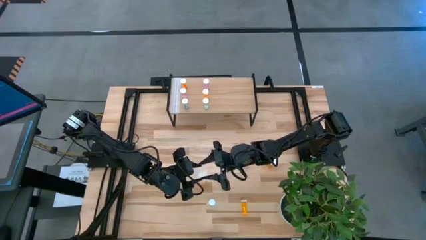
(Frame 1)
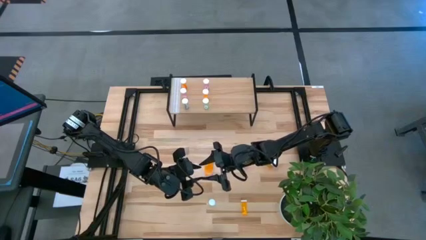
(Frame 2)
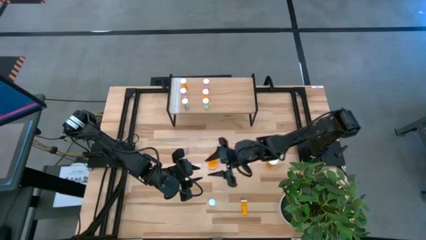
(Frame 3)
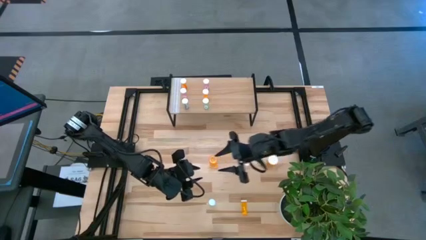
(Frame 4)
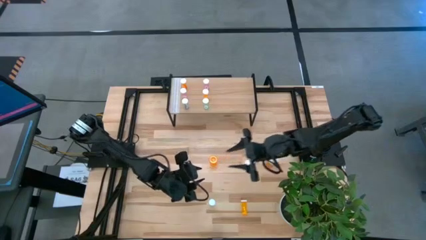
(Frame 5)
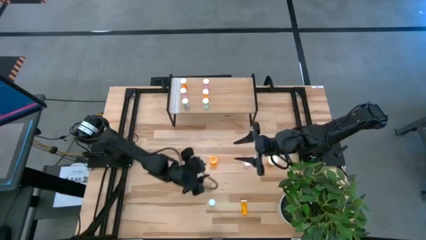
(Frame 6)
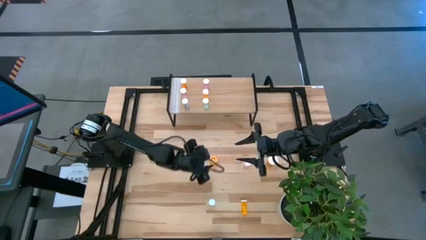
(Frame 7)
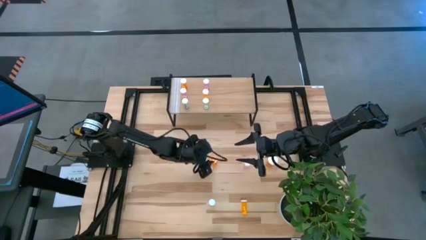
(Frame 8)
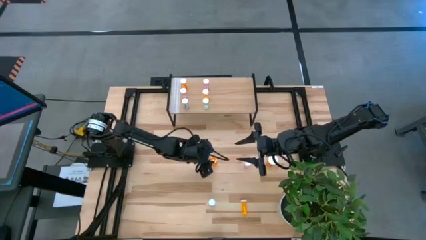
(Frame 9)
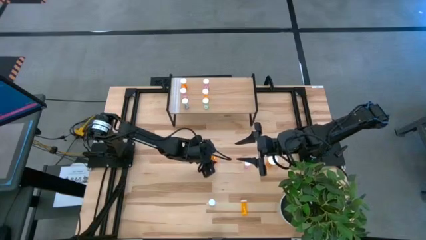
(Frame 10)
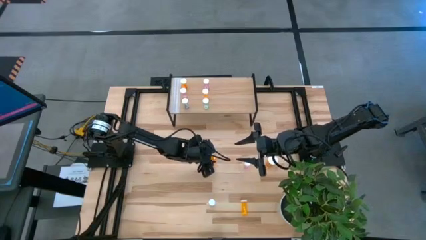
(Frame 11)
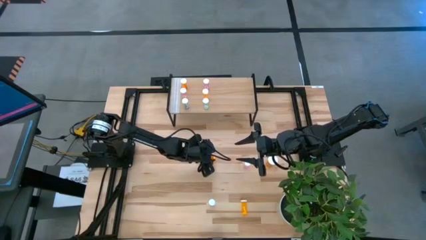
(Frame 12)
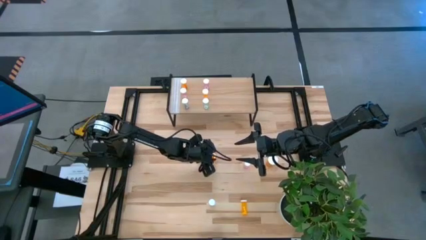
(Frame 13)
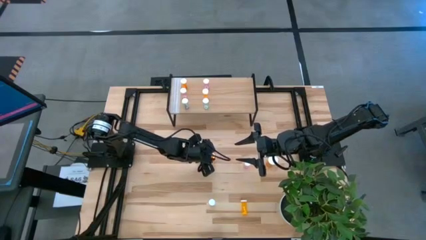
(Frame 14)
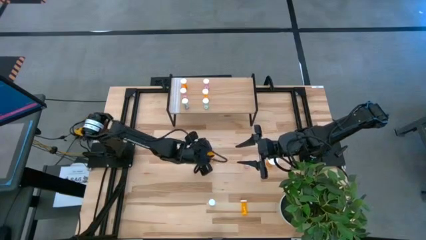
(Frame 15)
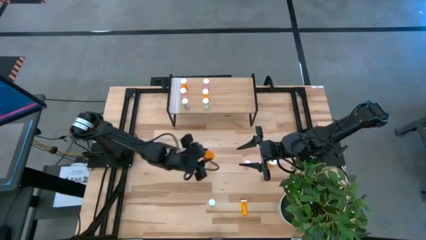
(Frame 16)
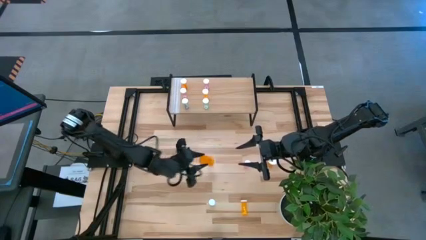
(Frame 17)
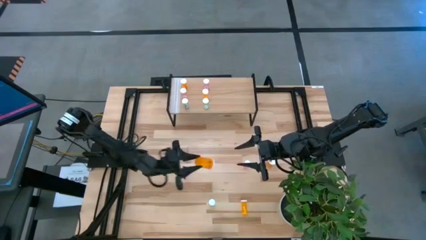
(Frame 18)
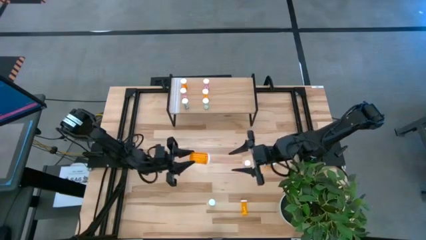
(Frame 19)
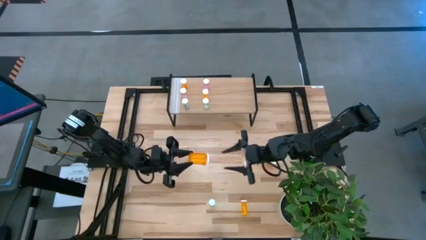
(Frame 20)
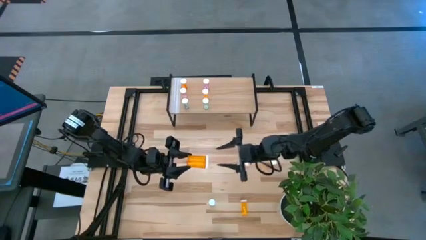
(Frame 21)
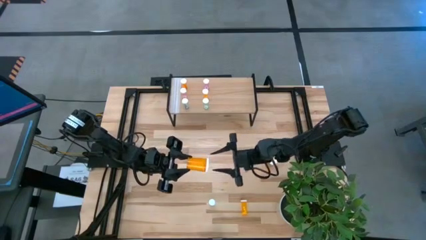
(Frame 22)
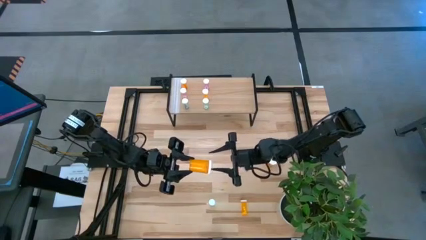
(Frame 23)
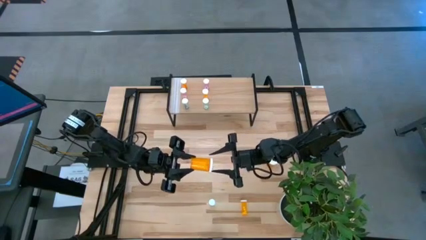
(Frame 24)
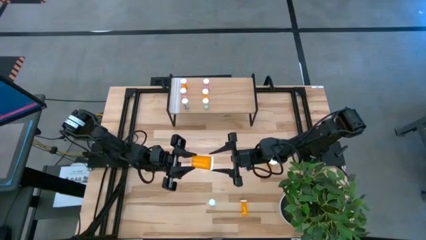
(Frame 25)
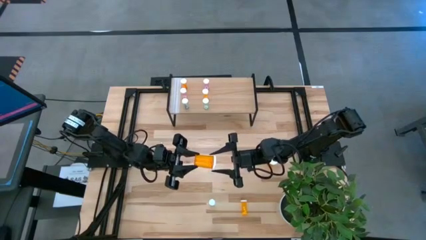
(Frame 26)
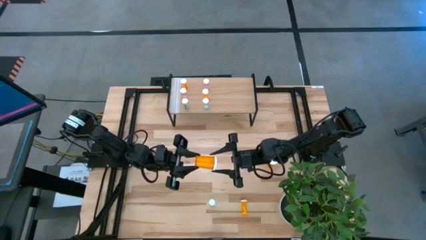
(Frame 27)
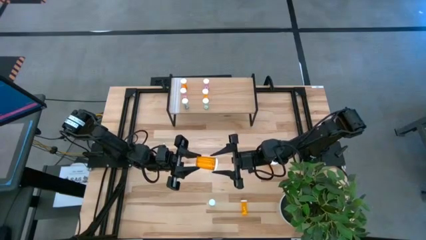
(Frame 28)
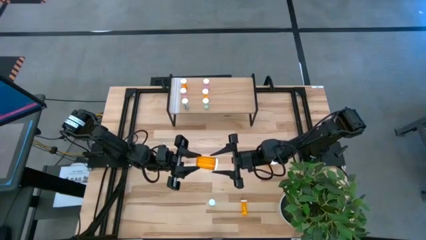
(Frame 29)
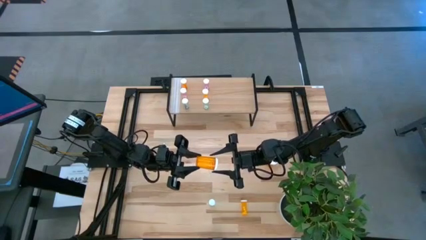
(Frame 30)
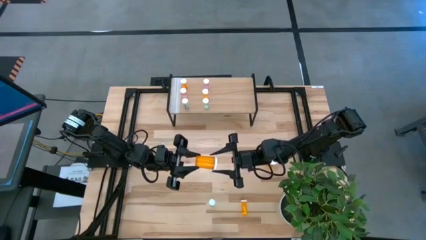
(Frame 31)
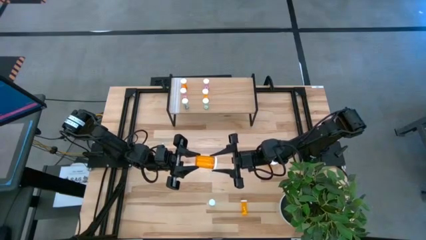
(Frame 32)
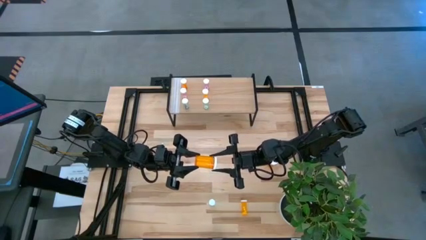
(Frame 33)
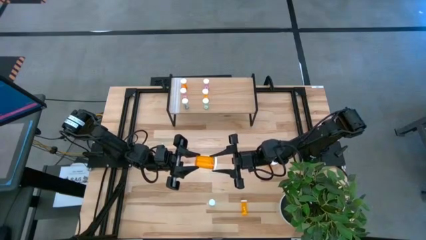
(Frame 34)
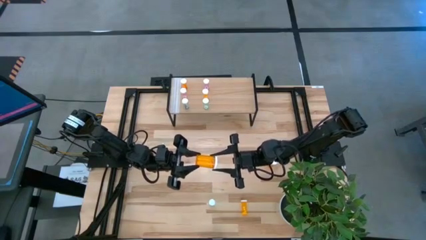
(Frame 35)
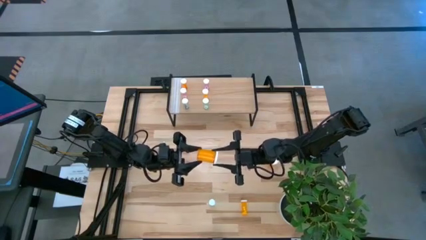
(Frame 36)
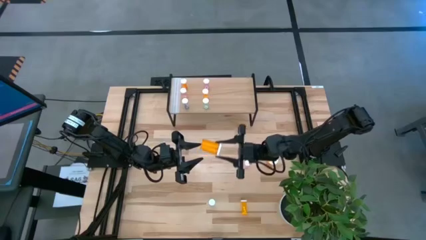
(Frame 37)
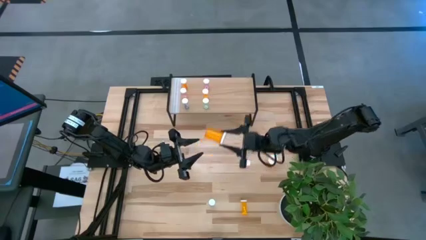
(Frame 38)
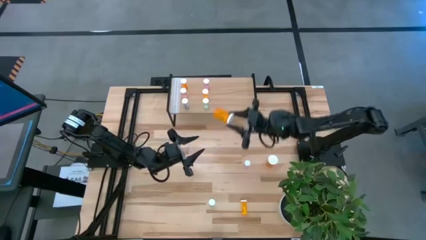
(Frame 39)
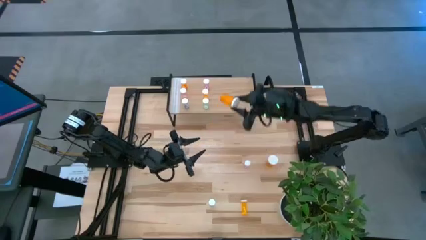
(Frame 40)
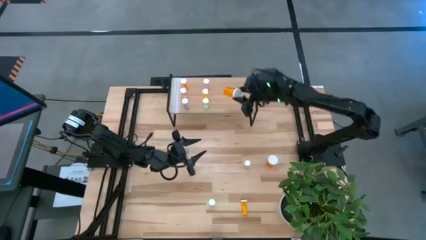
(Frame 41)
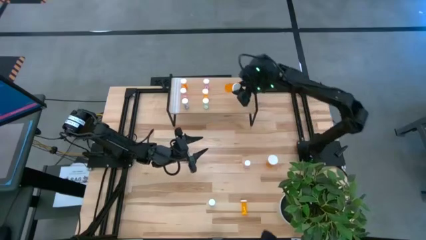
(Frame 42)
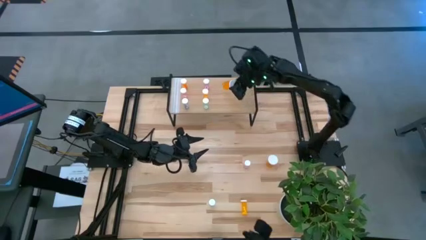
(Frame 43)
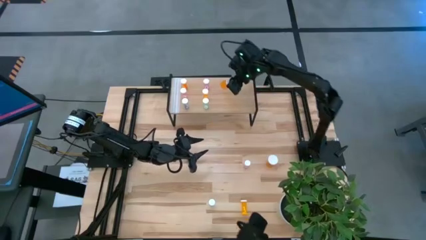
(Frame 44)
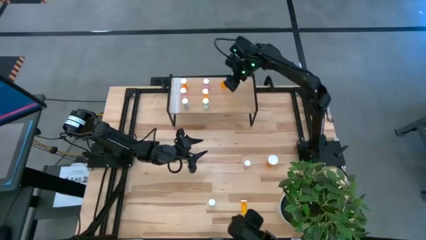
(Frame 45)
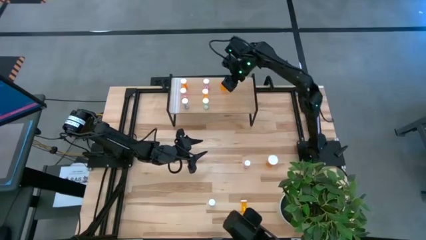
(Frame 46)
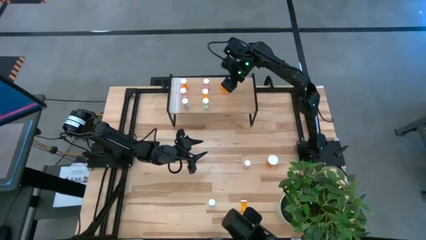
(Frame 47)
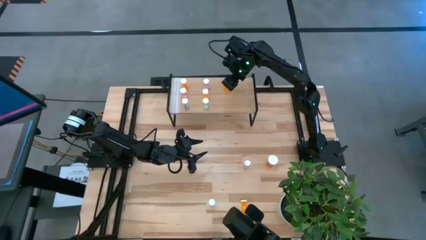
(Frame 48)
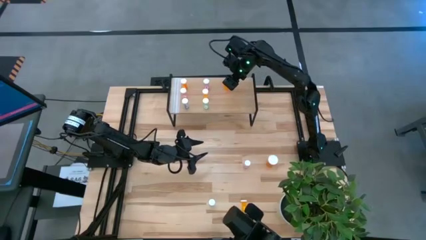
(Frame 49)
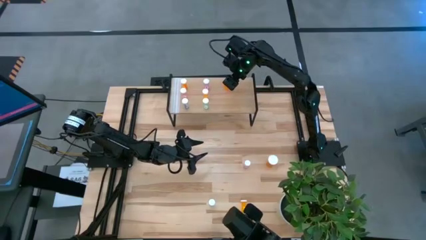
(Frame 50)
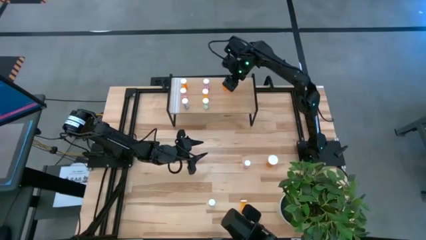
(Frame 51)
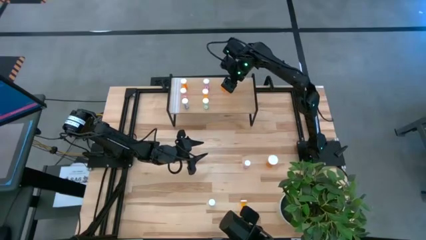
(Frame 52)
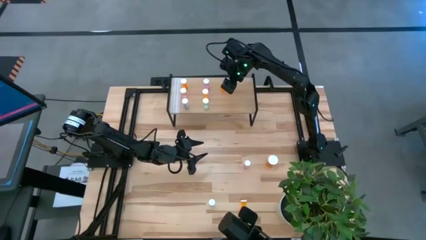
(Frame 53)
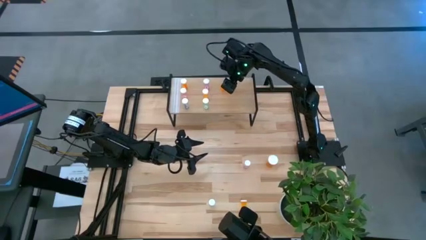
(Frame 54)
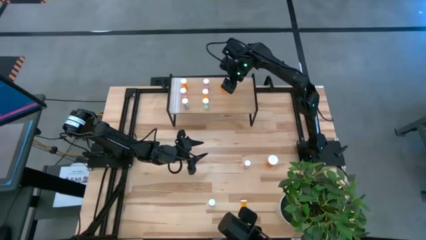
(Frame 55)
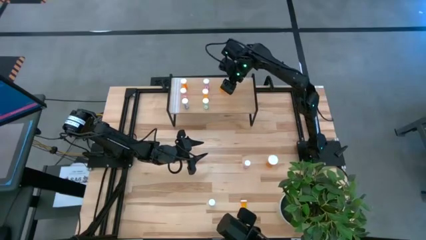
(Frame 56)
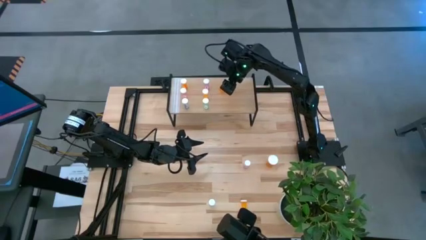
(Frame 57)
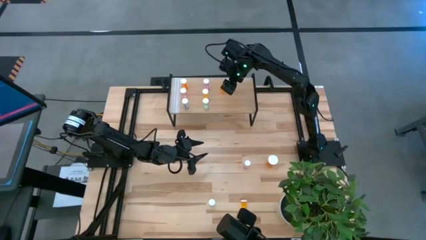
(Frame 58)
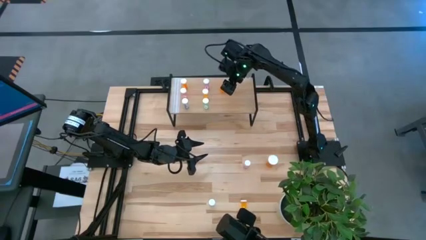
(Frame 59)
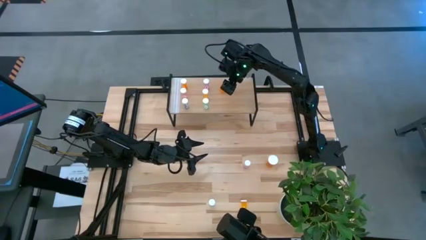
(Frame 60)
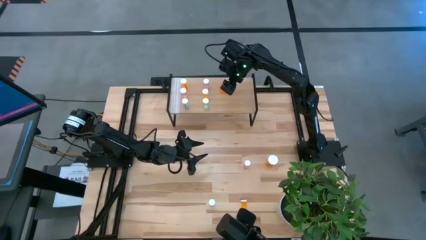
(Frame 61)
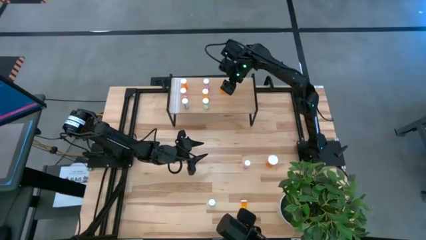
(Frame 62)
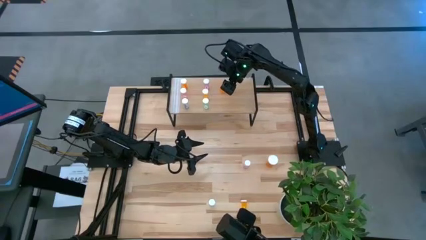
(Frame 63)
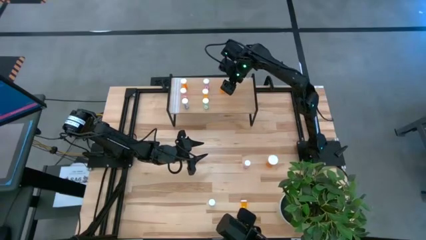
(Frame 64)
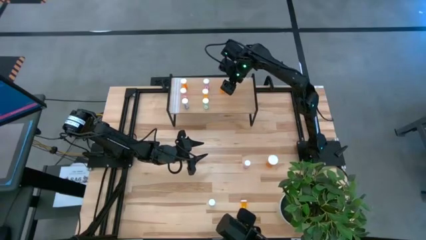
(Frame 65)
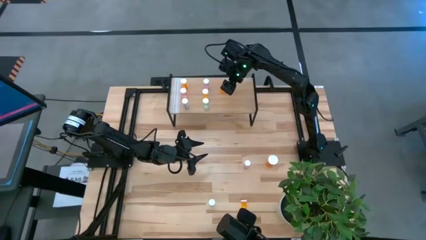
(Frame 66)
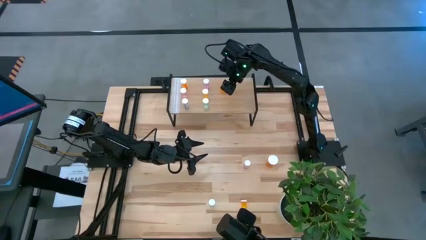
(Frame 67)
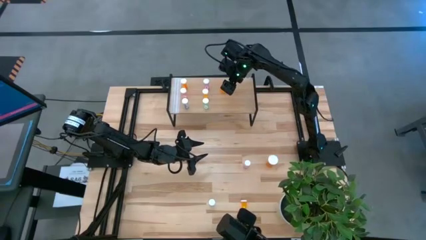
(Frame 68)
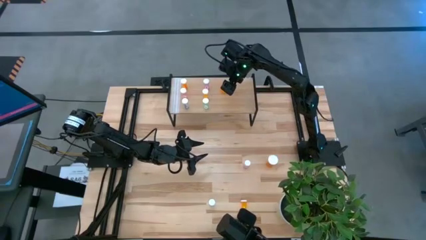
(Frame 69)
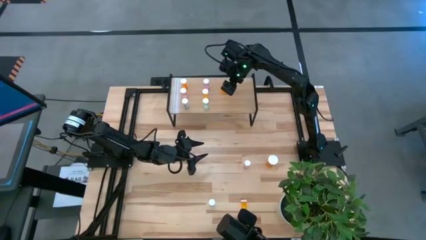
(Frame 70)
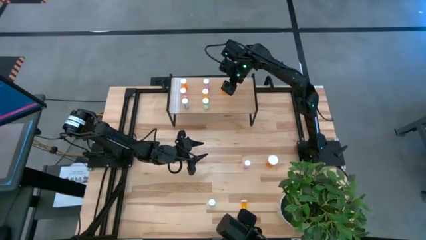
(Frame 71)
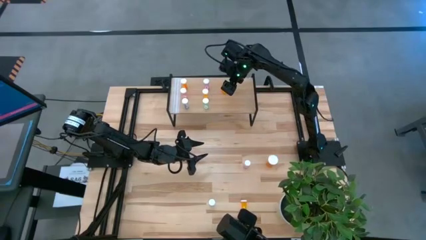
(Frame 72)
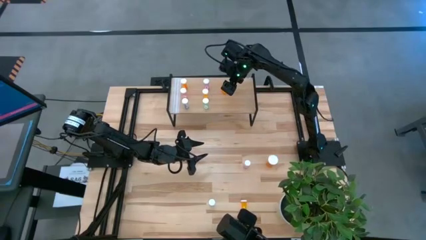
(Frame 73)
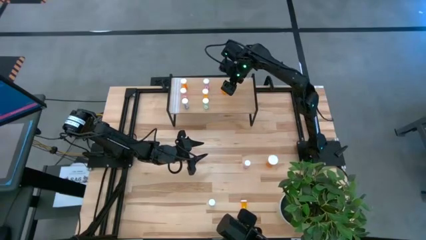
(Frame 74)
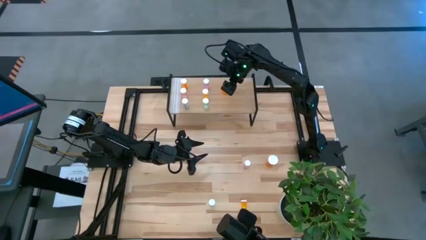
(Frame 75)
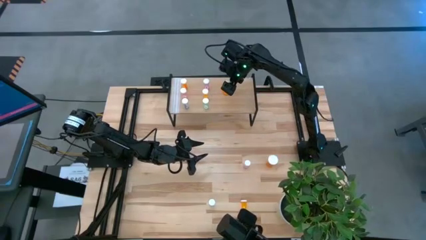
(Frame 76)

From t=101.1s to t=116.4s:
Task: Pick and place medicine bottles onto shelf by color
Put the bottom large orange pill bottle on the shelf

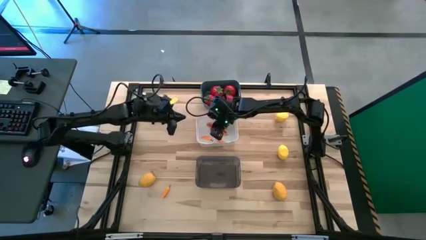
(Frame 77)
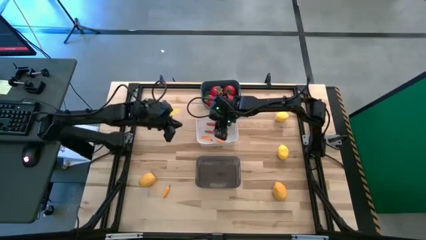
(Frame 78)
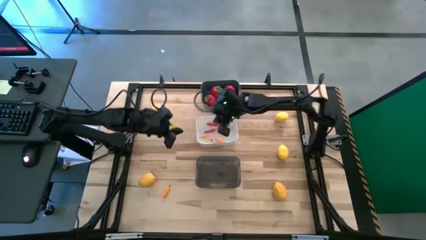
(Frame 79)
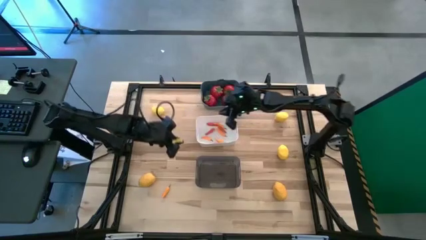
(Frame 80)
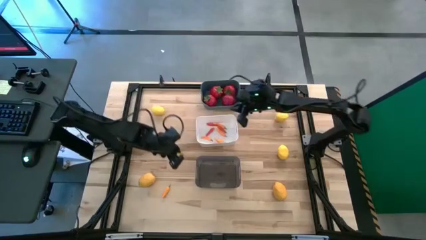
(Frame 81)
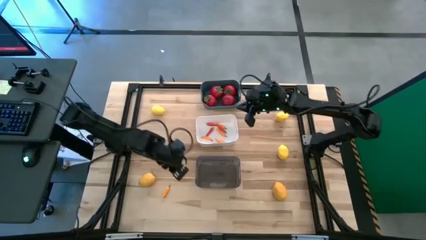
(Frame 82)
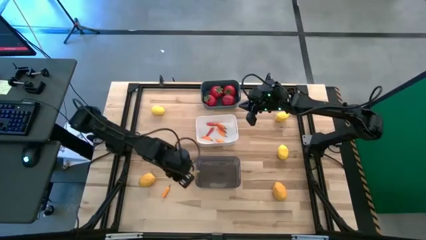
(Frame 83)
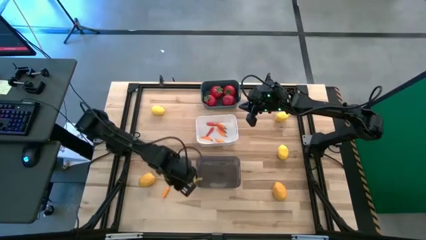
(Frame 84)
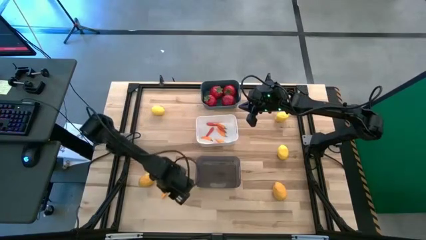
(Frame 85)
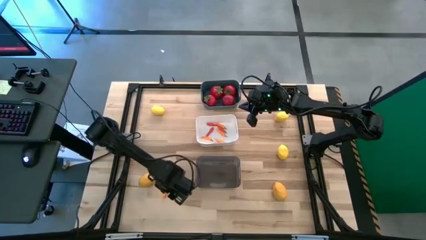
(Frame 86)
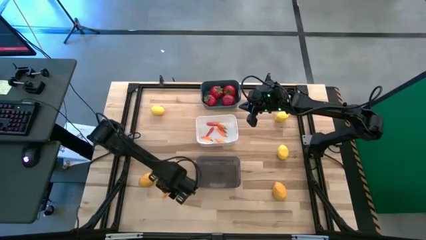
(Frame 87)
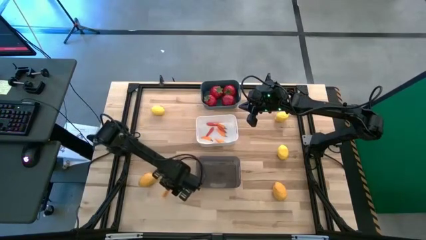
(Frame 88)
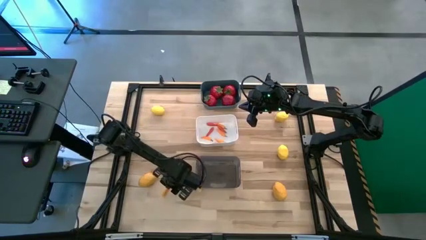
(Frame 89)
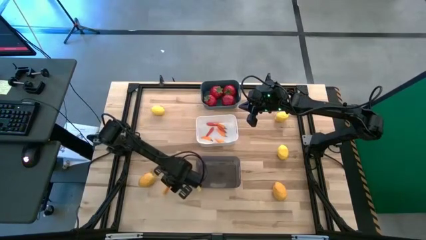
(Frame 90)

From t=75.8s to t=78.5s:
Task: Sort produce into baskets
Put the orange chili pepper into the white bin
